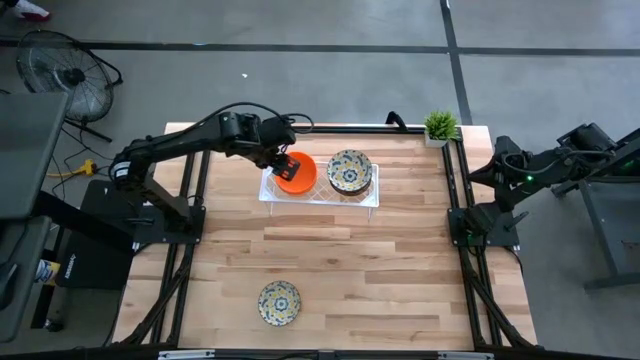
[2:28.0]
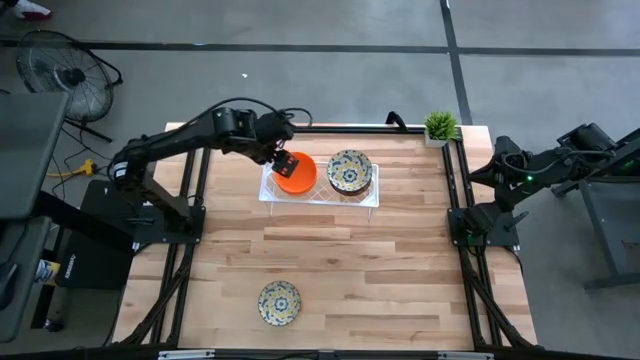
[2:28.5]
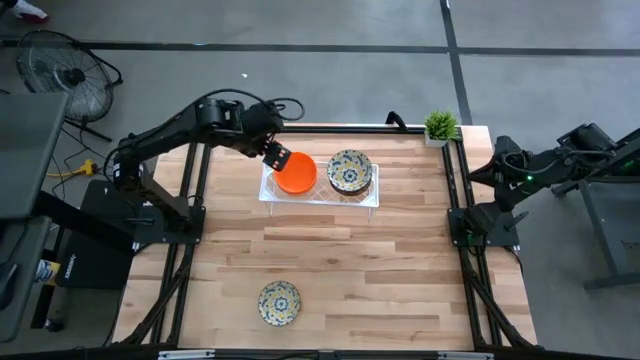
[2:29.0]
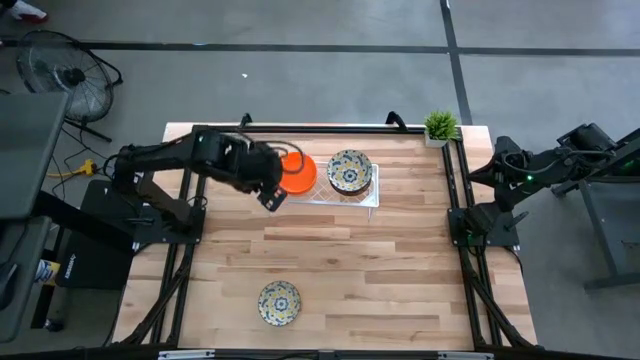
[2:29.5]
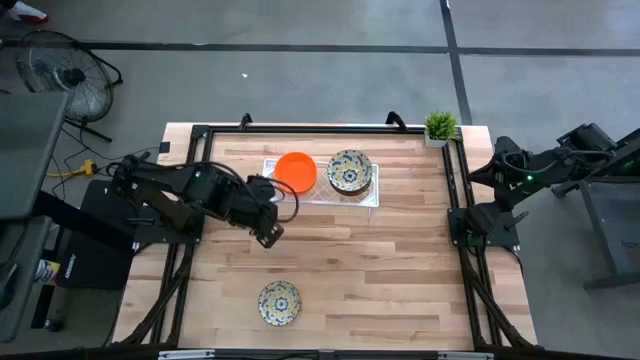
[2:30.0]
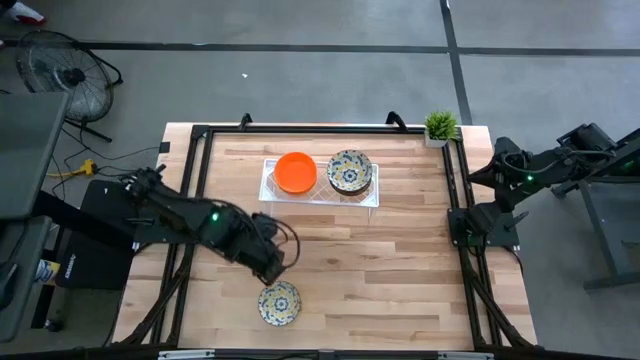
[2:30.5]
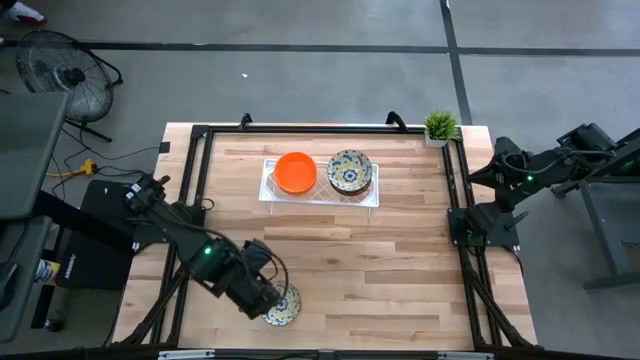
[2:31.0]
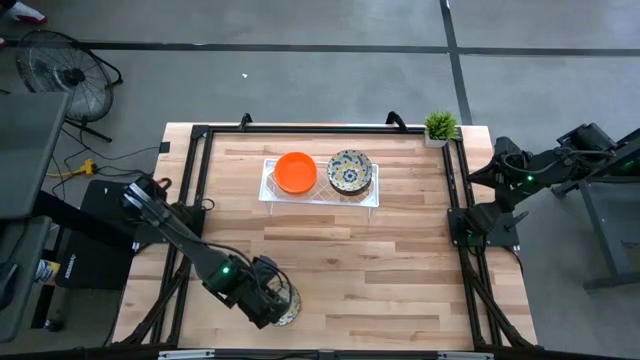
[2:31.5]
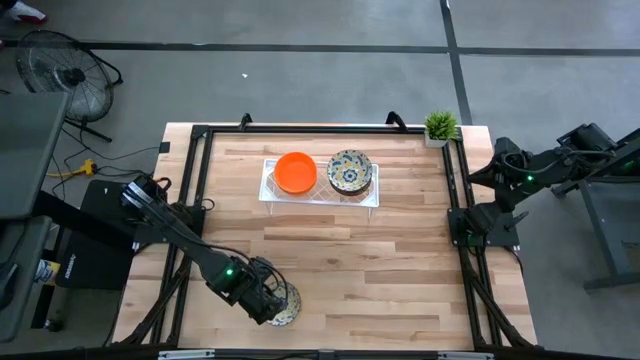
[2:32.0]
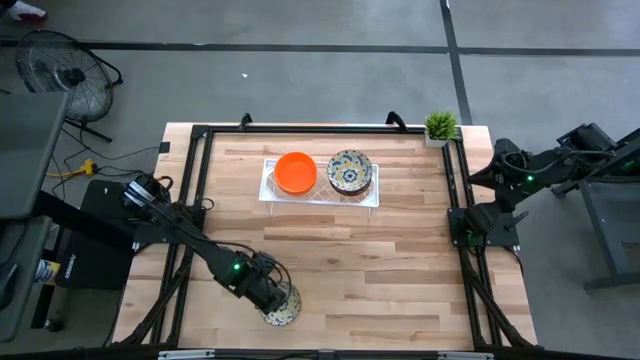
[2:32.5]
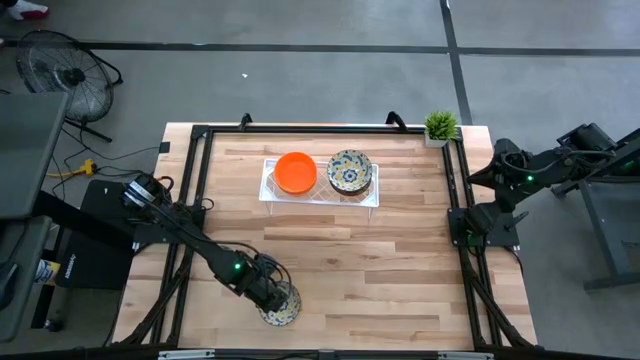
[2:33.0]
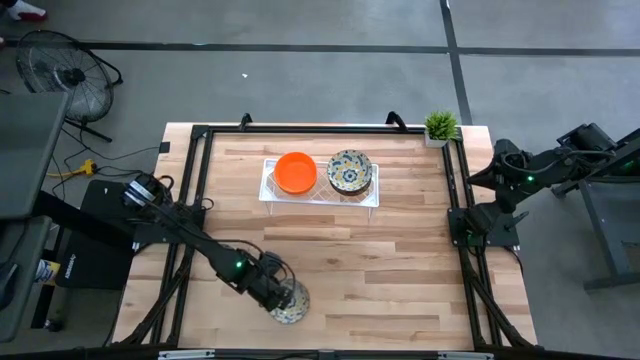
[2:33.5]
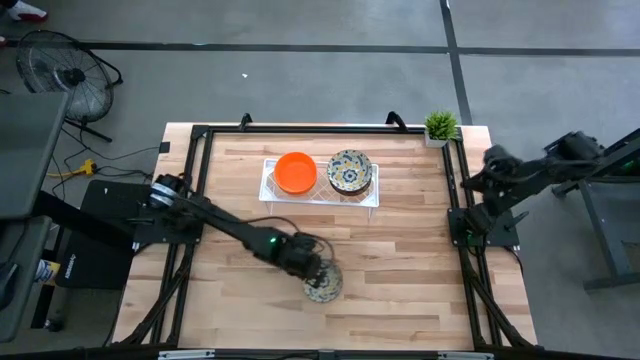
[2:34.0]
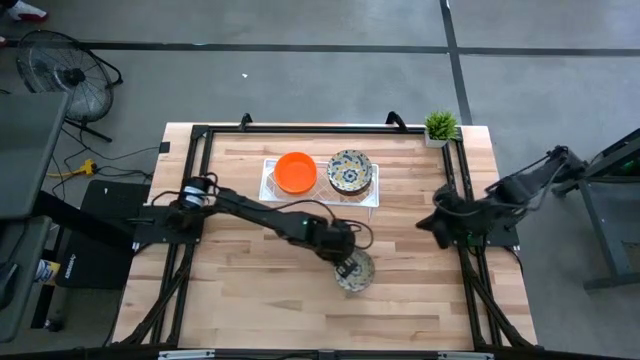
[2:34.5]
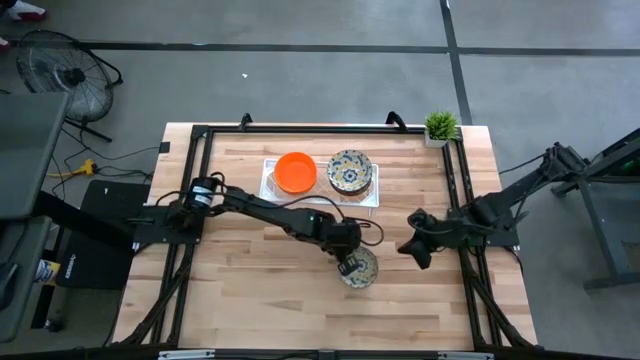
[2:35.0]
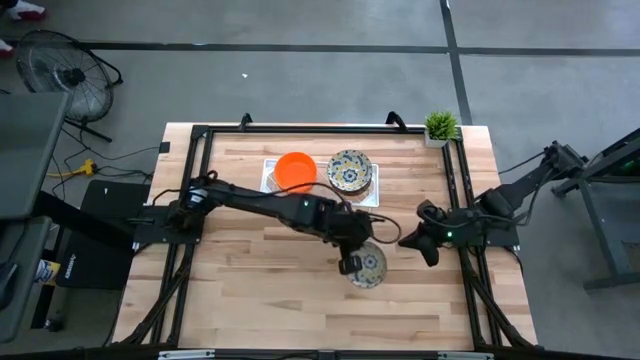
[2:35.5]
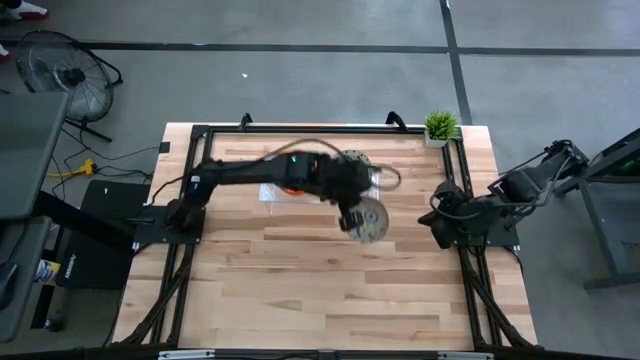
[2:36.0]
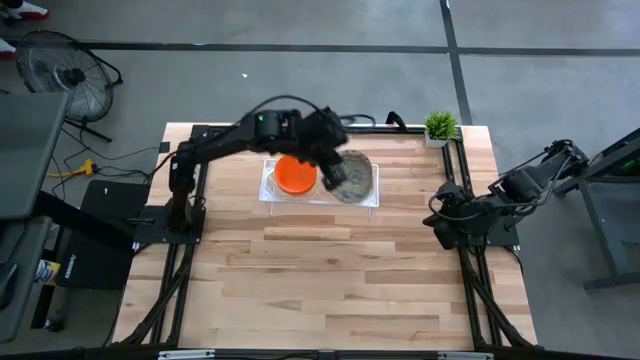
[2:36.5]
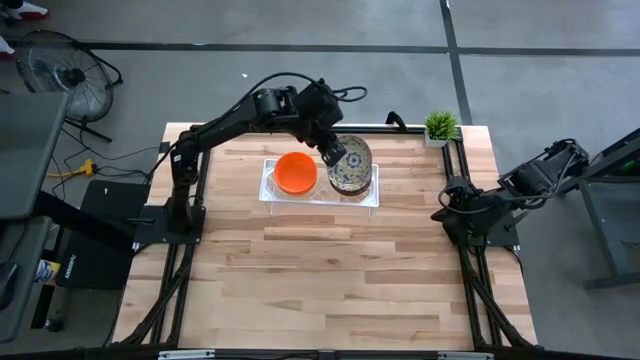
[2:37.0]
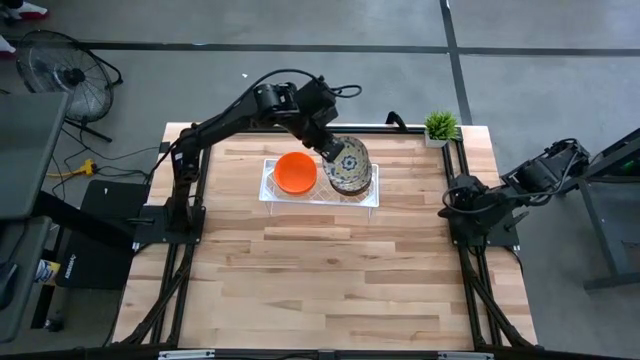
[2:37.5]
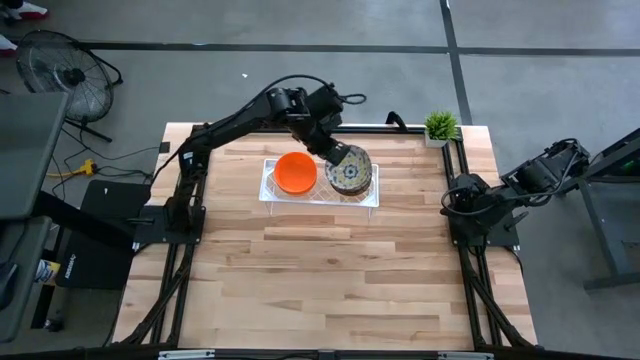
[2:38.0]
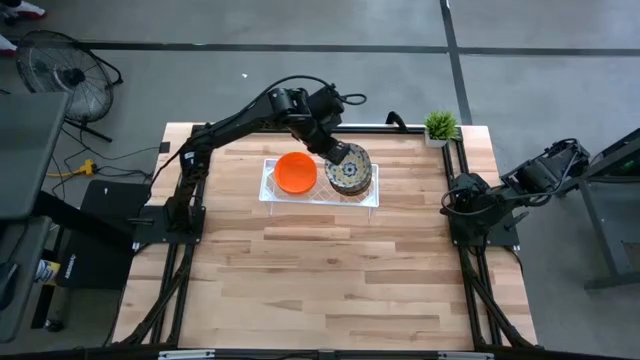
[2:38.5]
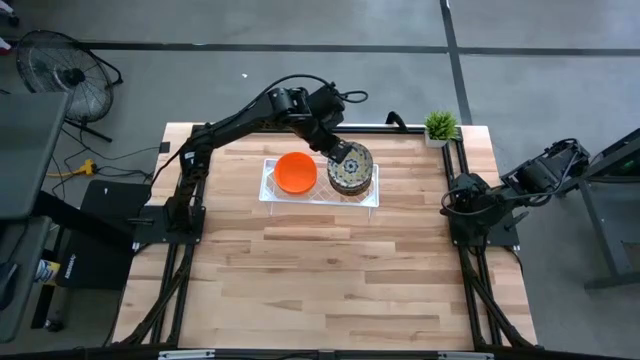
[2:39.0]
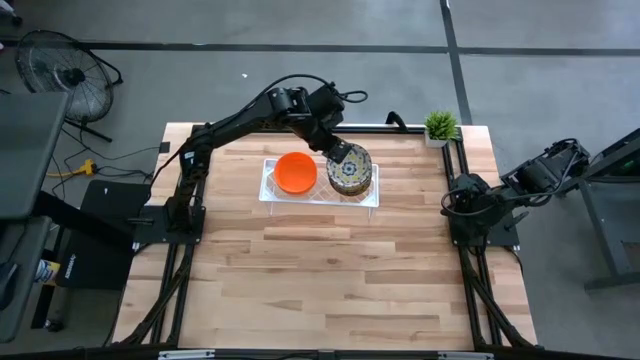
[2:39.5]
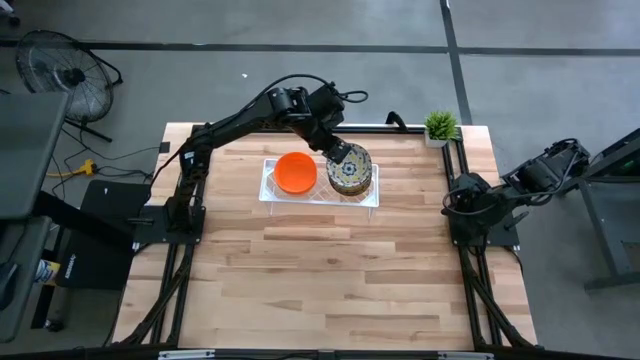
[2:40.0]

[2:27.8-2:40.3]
Task: Pick & Place Mini bowls
Stack the yellow patterned bowl on top of the other yellow patterned bowls on the shelf

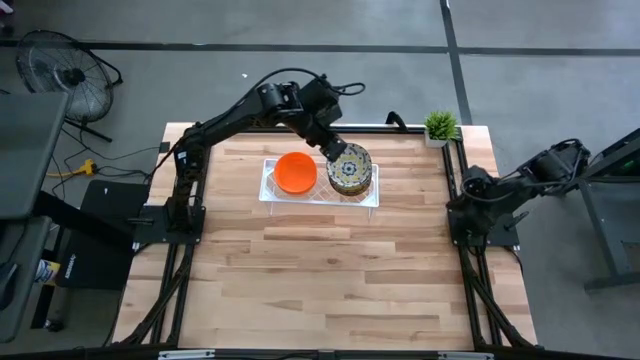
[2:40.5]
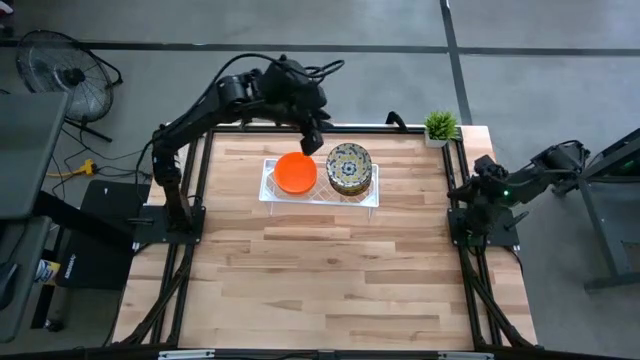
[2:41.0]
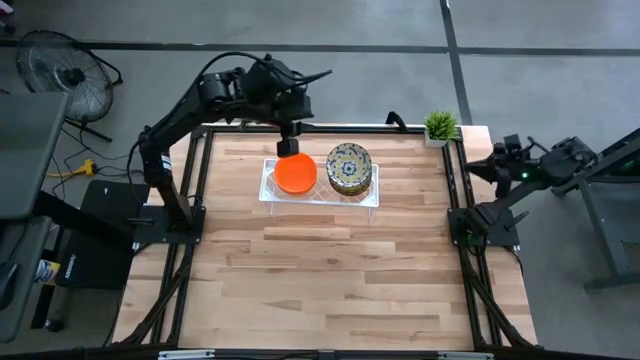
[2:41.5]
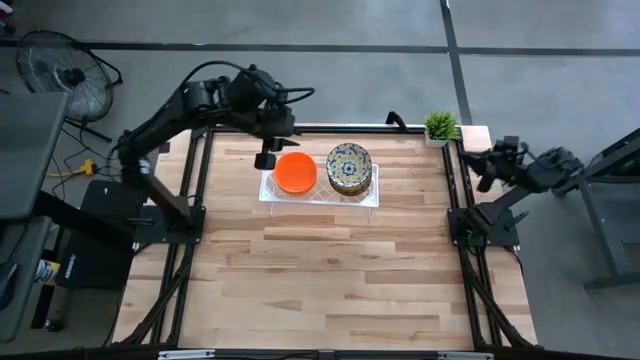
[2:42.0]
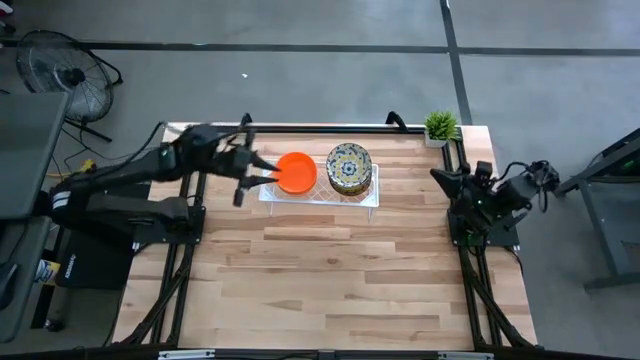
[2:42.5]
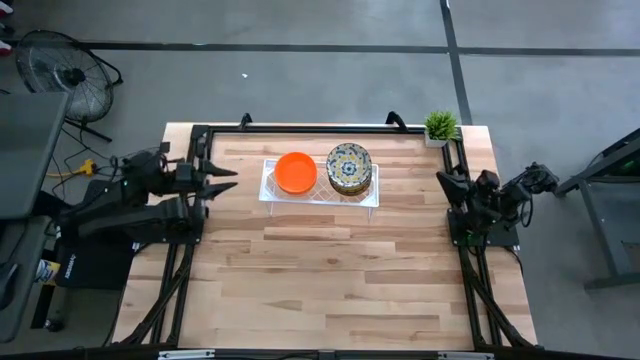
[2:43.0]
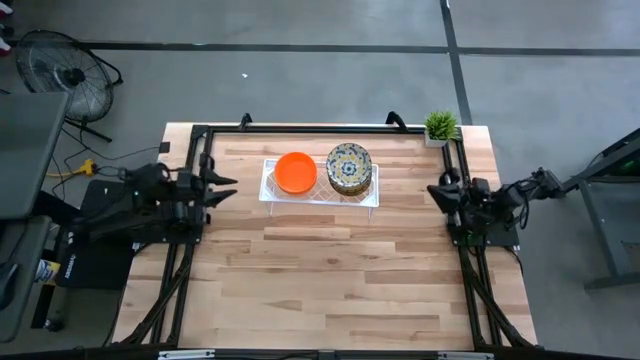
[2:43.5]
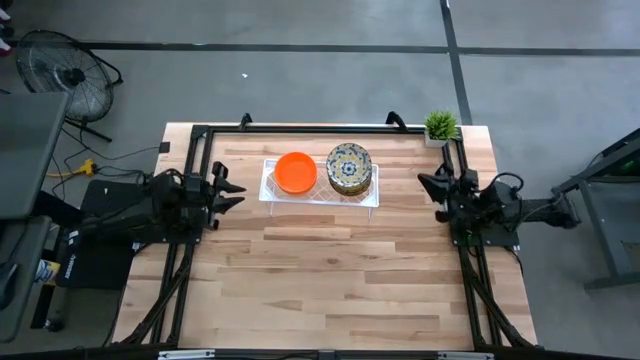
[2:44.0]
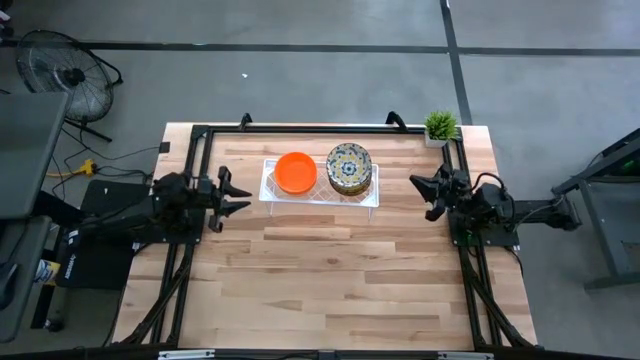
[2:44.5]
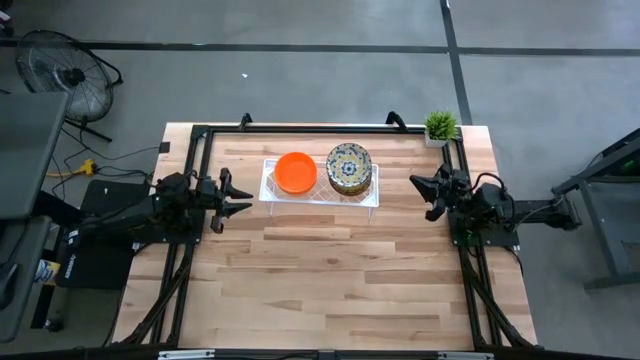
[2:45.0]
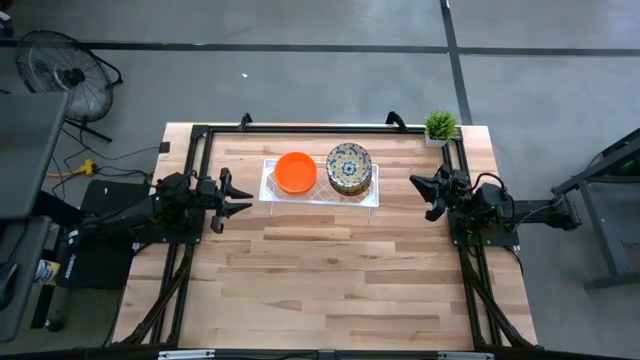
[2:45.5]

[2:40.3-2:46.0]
Return to Home Position

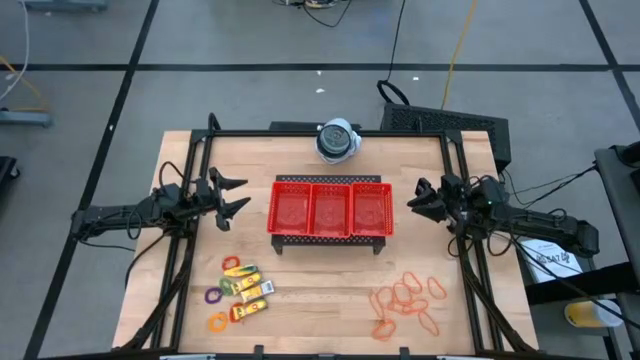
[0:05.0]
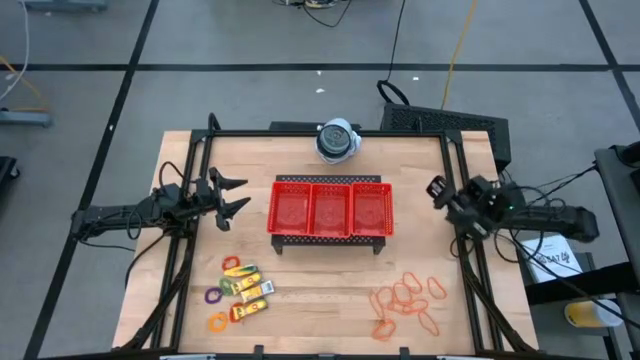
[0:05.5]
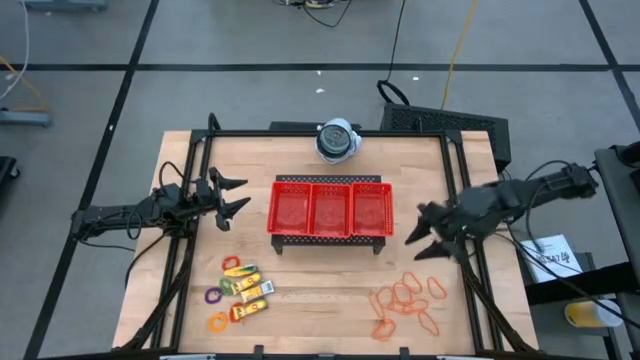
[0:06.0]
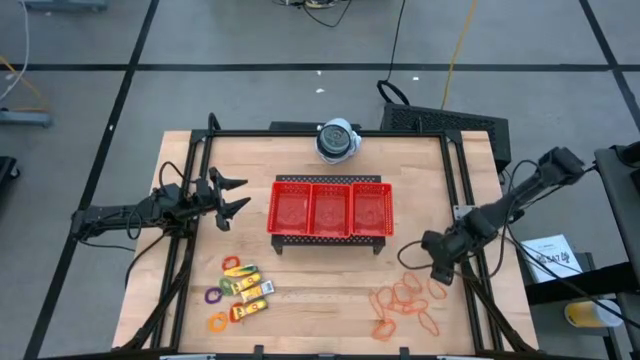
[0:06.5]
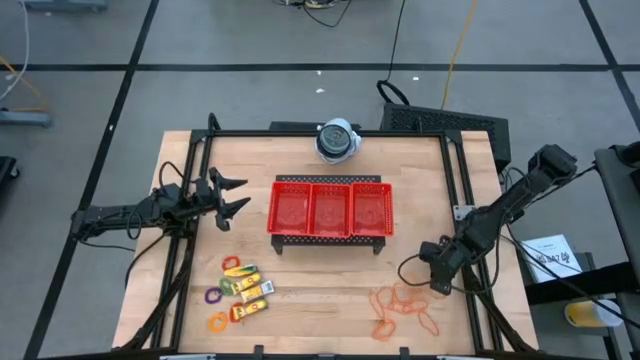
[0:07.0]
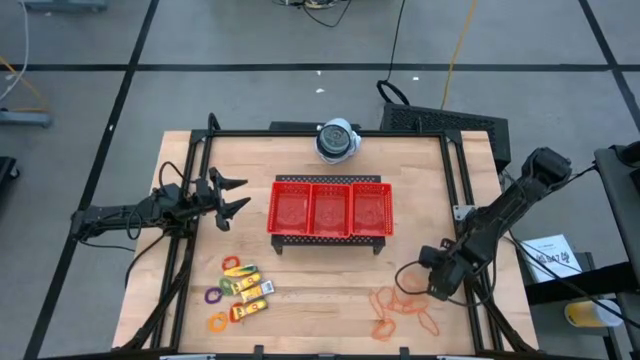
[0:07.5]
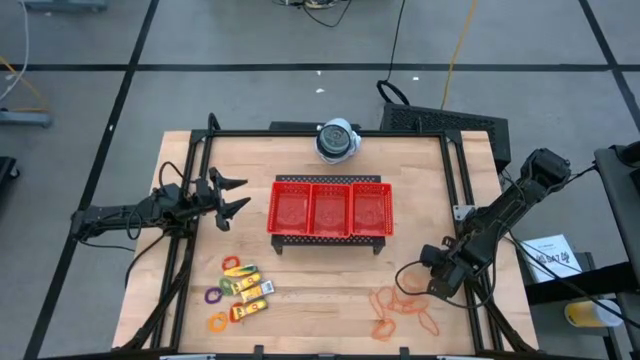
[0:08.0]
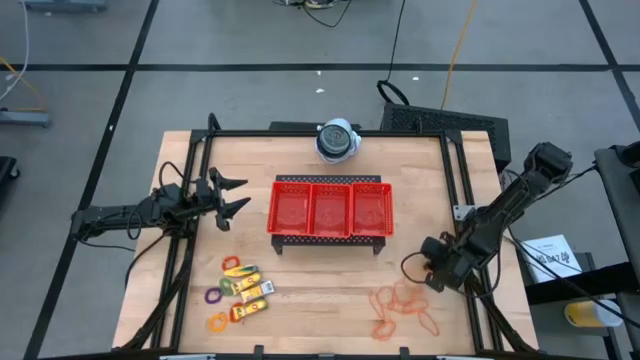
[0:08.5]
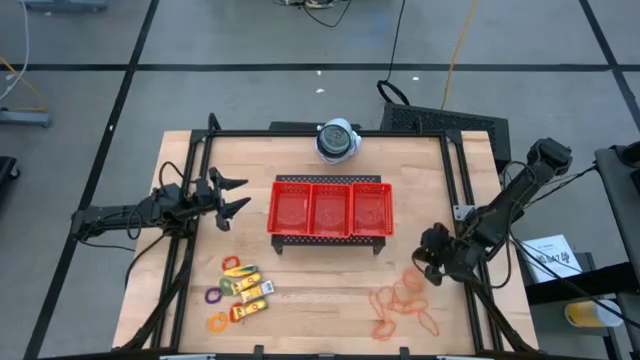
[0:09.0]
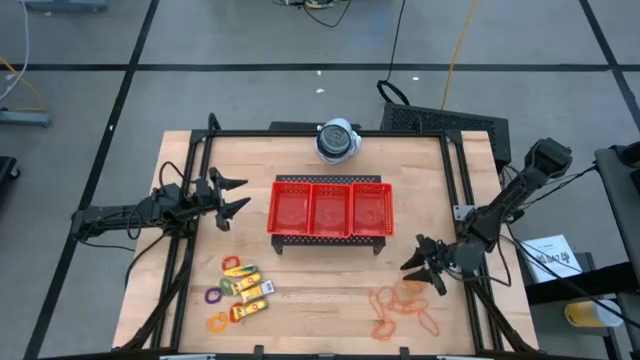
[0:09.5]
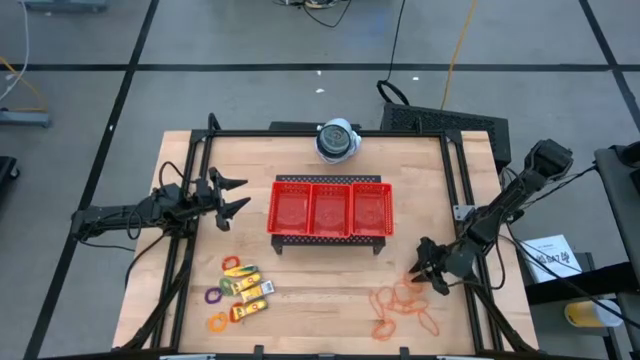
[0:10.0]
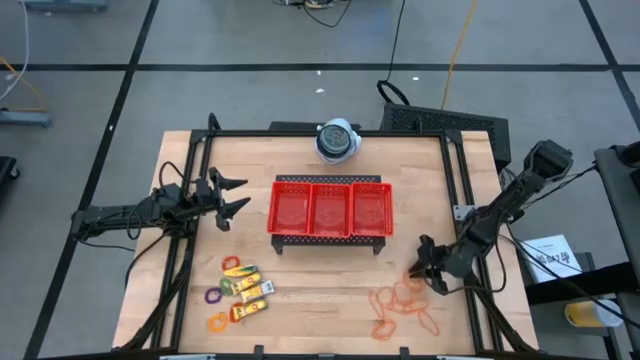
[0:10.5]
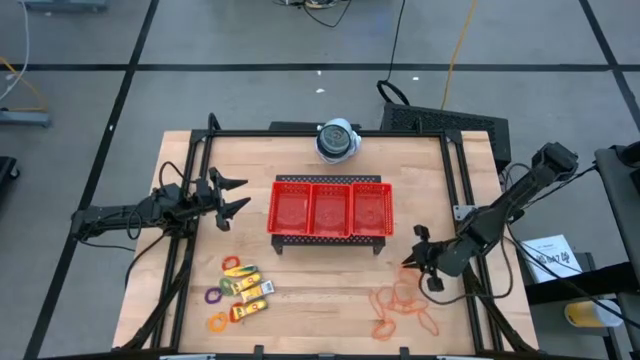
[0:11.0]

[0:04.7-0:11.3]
Task: Pick & Place Office Desk Supplies
Put the orange rubber band into the right red bin
